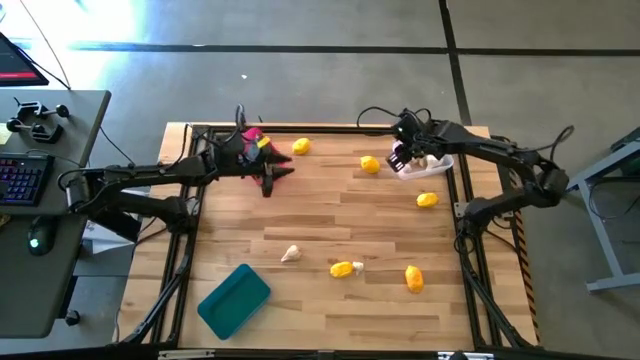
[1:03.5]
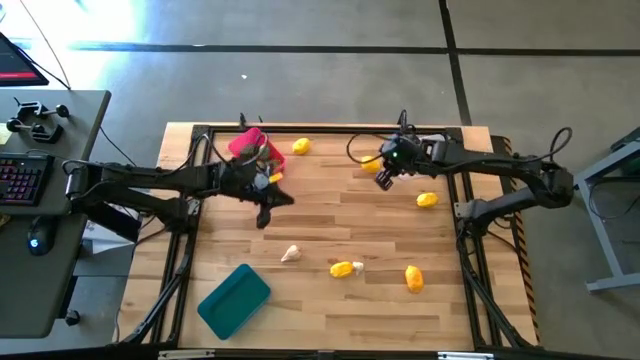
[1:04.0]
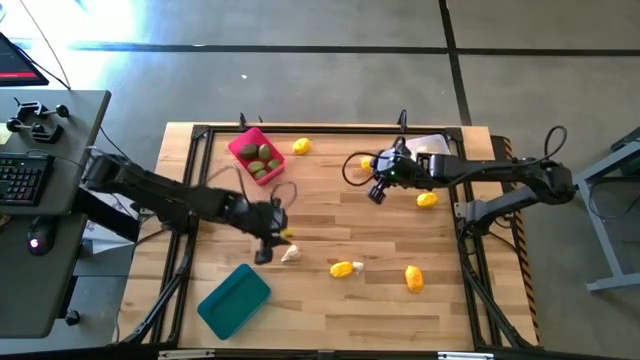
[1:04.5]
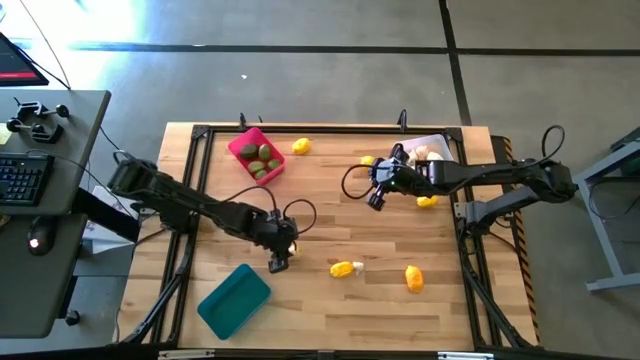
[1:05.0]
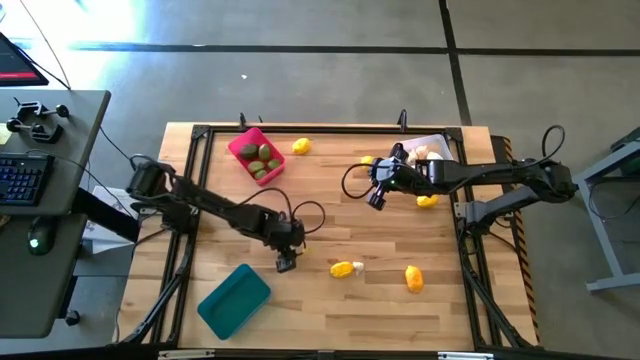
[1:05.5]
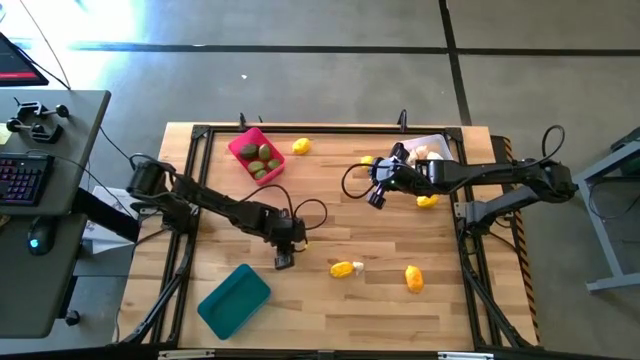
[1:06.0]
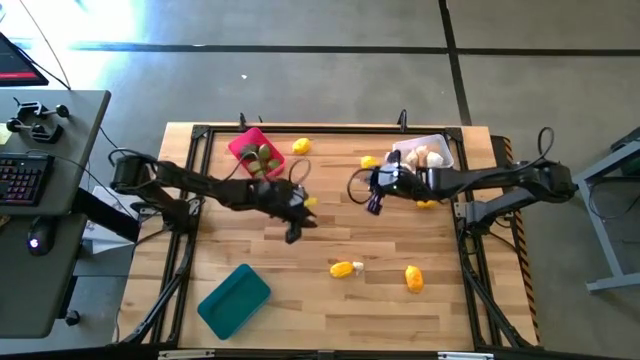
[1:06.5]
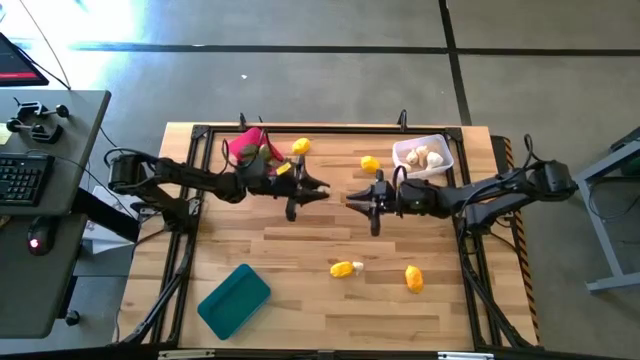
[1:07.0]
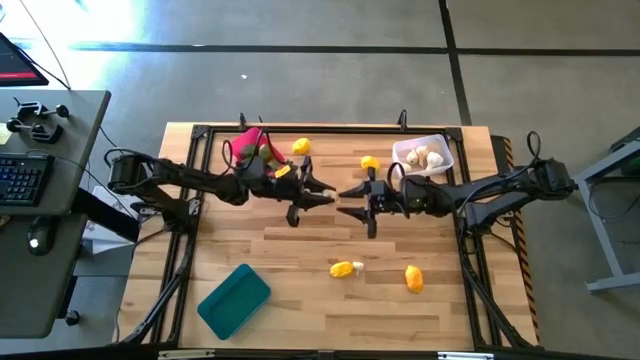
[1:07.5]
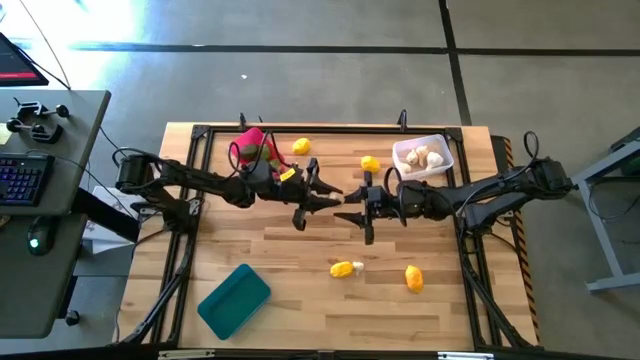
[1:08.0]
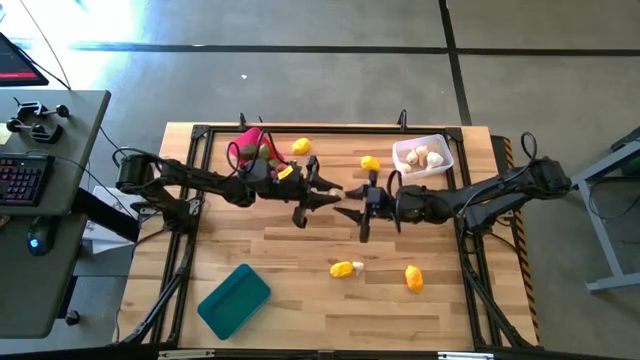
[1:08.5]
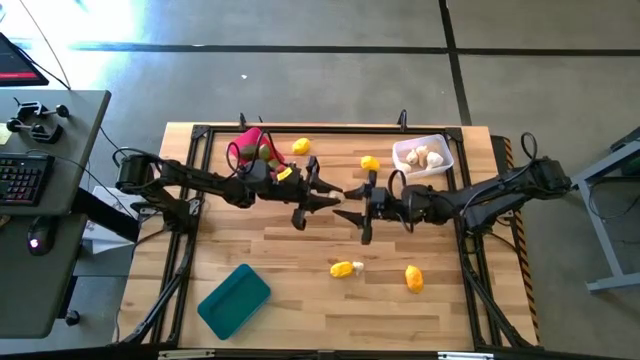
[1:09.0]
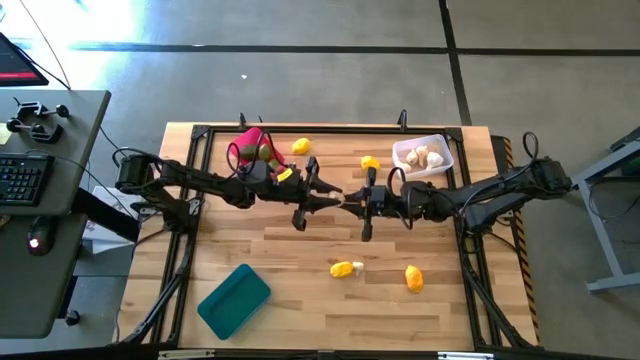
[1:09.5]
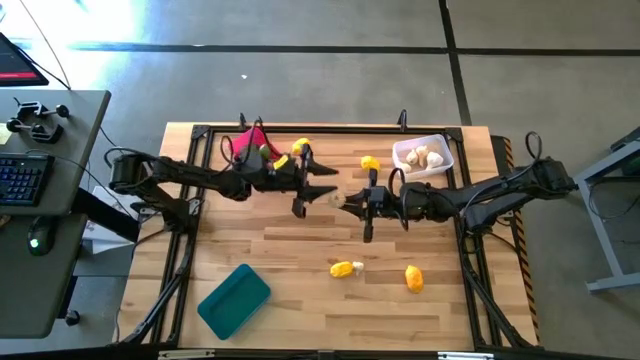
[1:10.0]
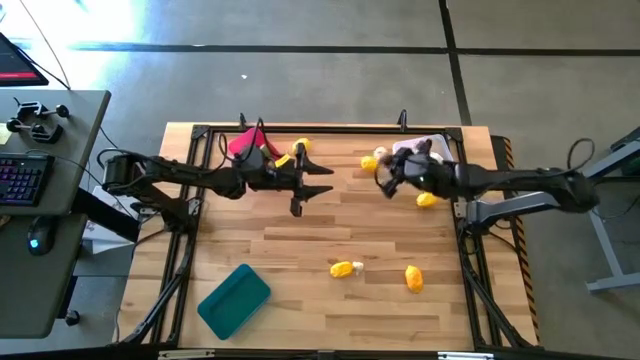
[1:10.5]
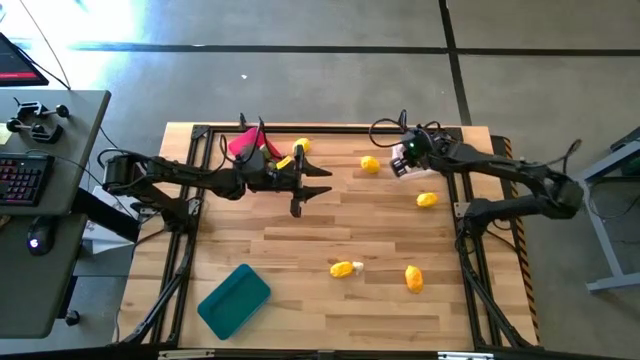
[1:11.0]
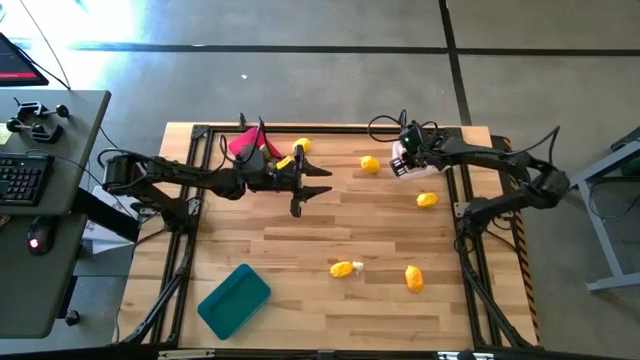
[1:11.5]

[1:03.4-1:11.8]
Task: Sort produce into baskets
Put the white garlic in the transparent bin

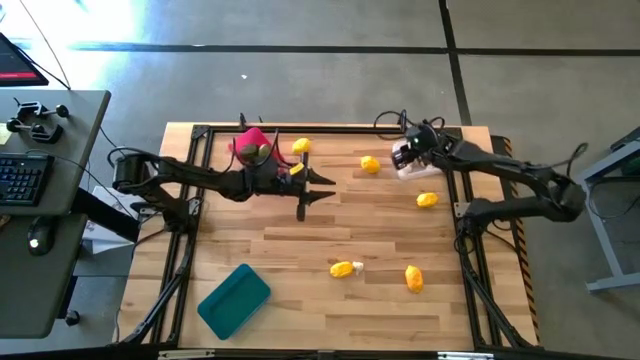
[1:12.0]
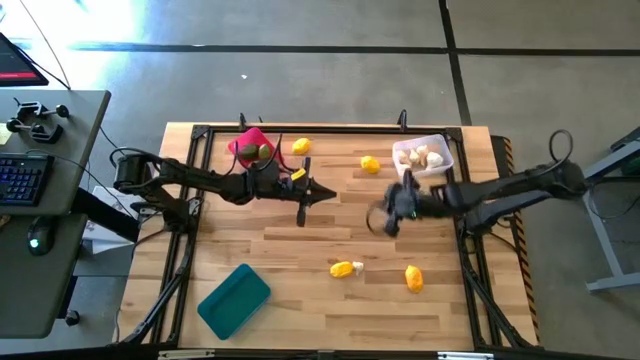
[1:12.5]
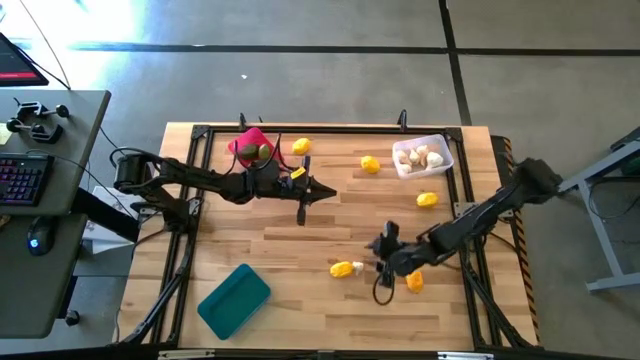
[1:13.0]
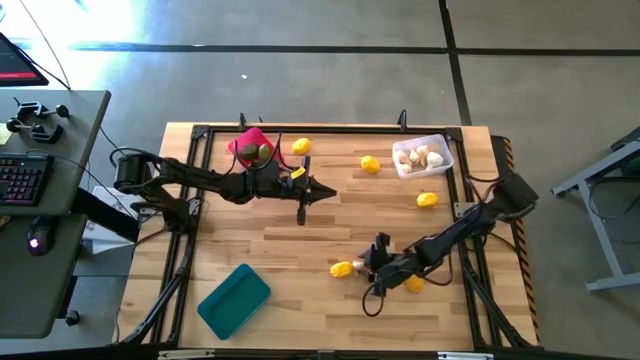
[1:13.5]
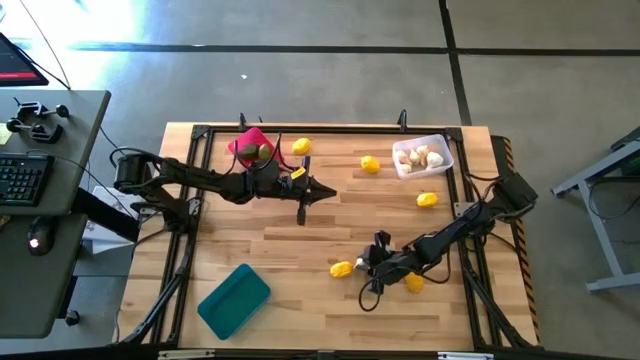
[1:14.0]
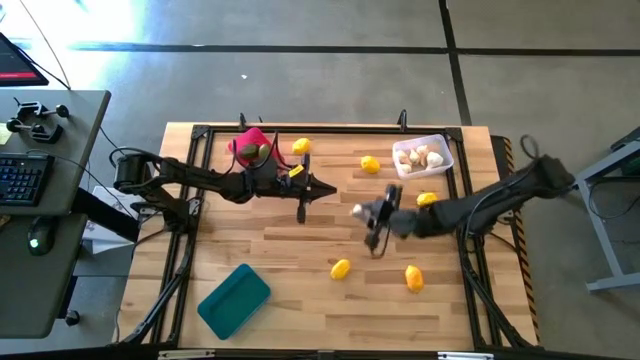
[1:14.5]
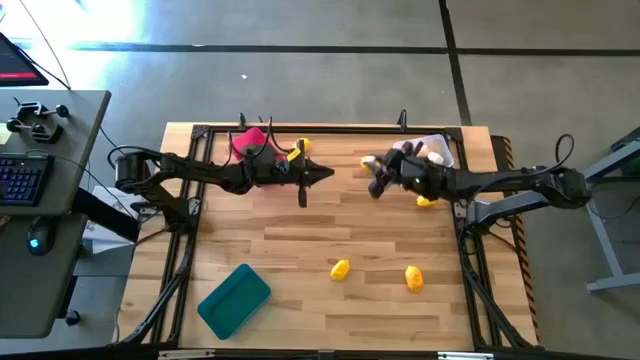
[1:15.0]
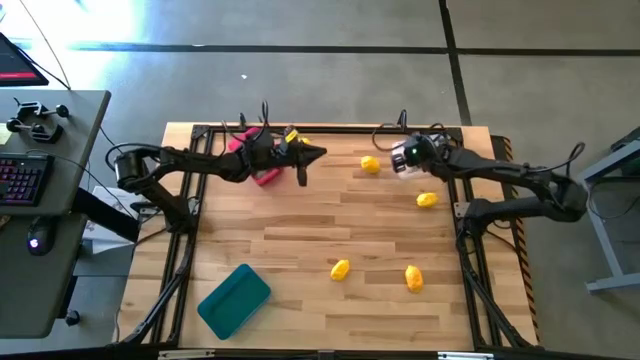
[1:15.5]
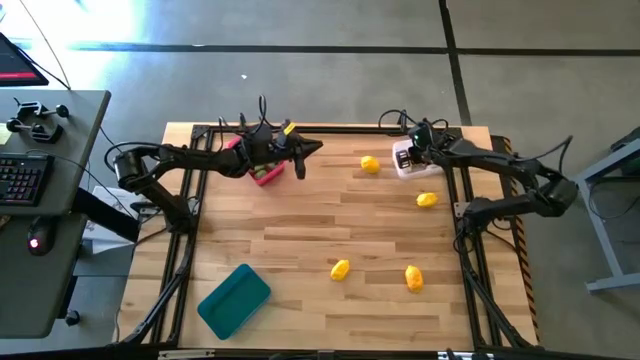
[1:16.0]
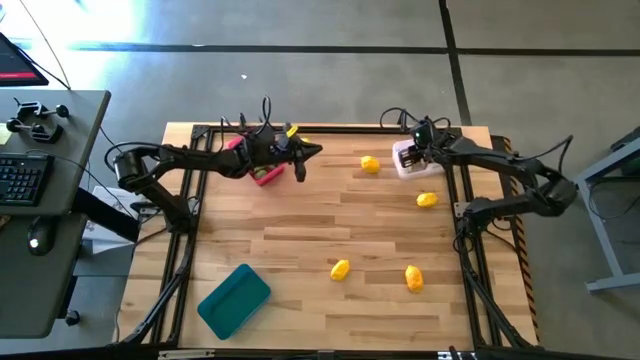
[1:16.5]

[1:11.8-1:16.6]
Put the white garlic in the transparent bin

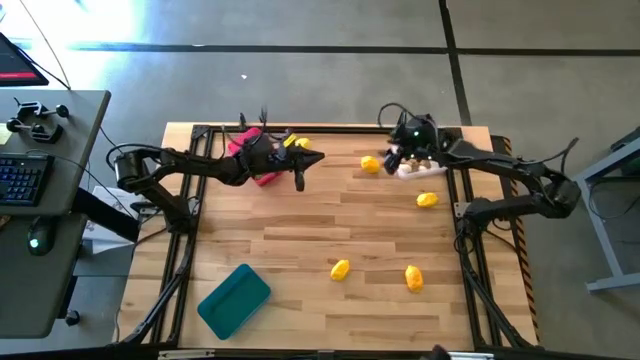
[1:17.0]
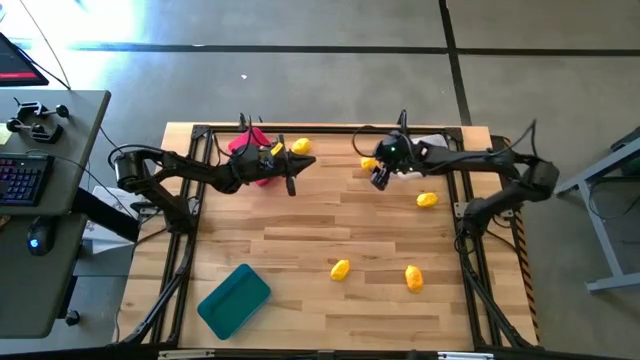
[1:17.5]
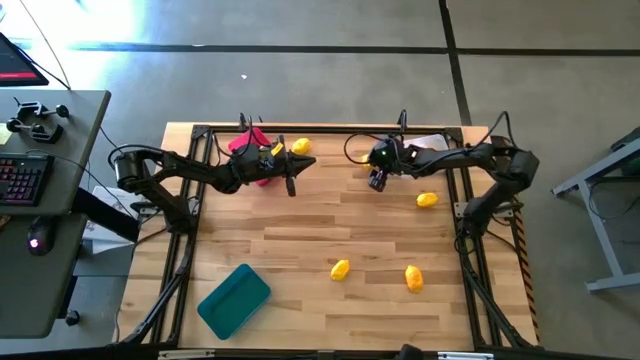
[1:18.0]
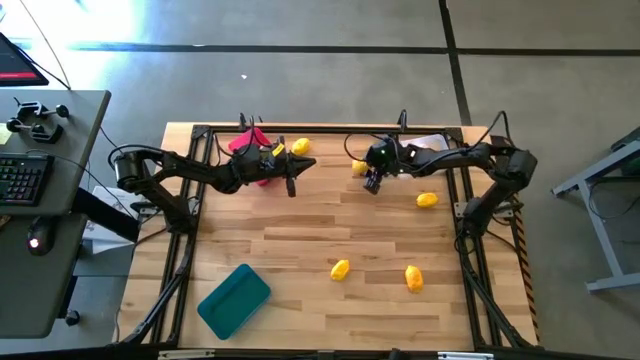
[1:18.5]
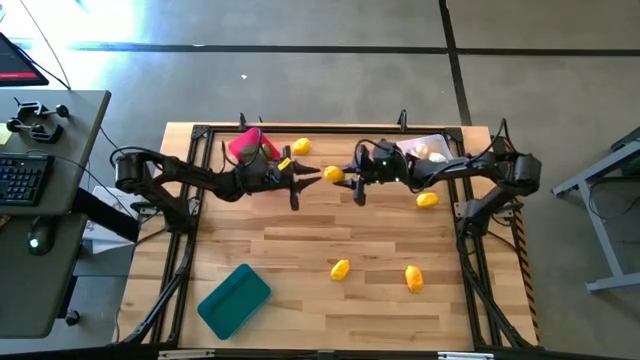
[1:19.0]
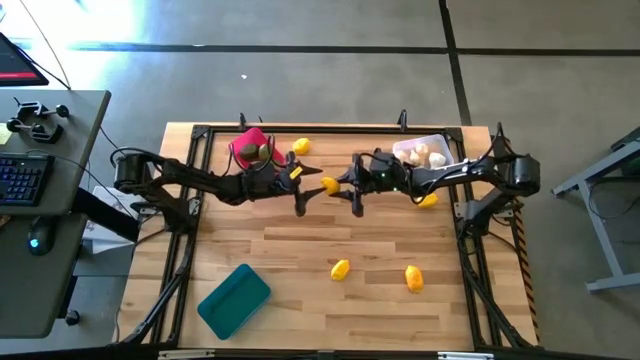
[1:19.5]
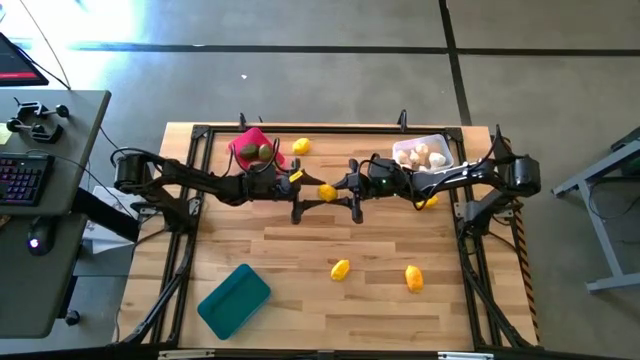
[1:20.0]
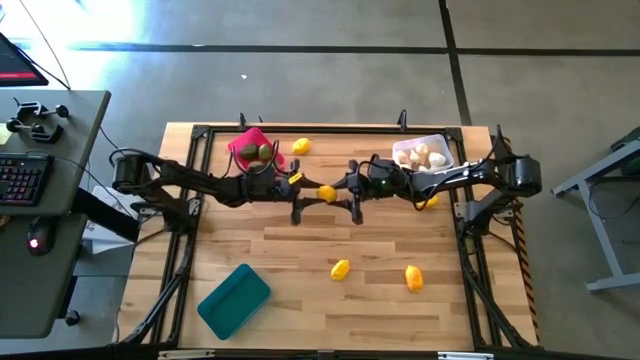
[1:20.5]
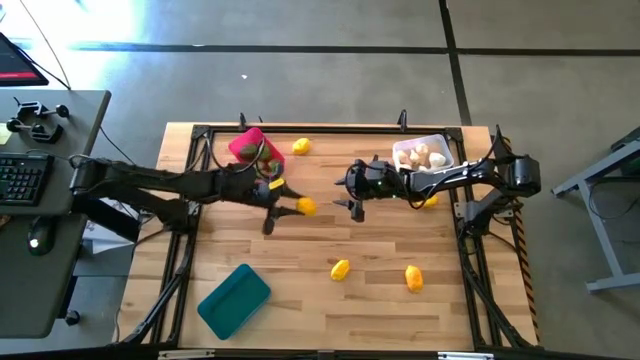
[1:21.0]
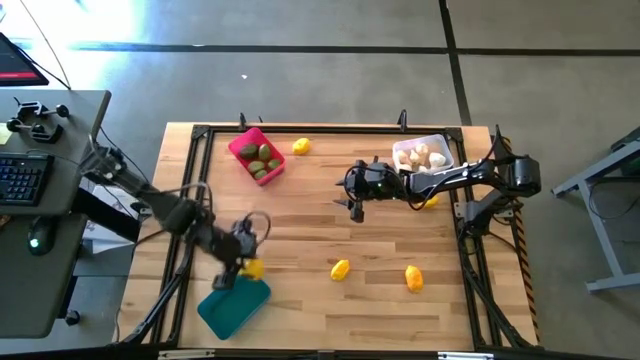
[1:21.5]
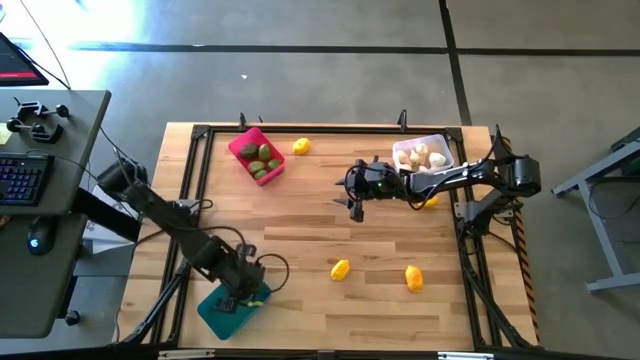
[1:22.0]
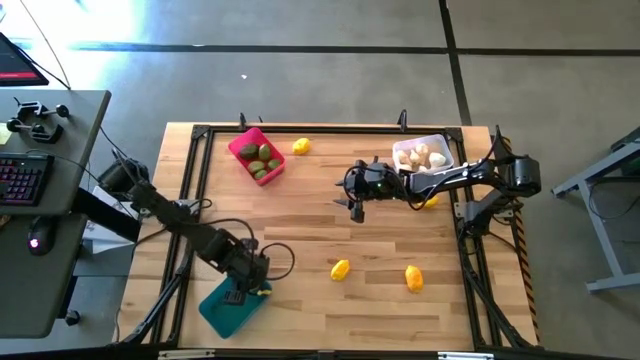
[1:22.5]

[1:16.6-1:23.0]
Put the yellow lemon in the blue bin
